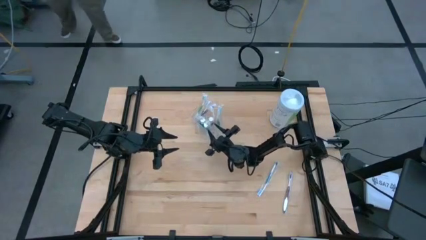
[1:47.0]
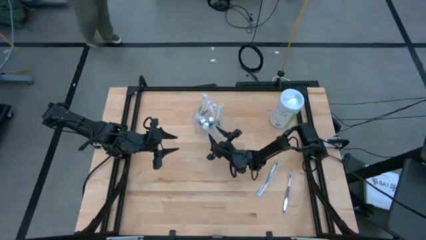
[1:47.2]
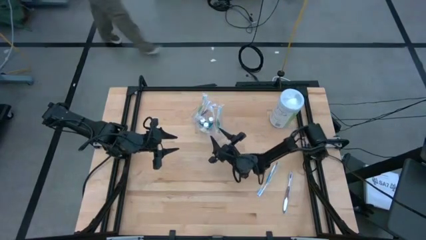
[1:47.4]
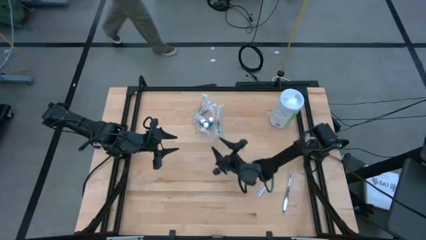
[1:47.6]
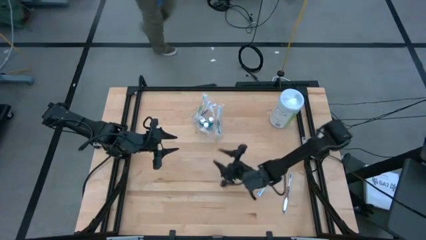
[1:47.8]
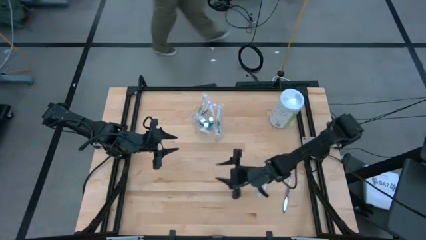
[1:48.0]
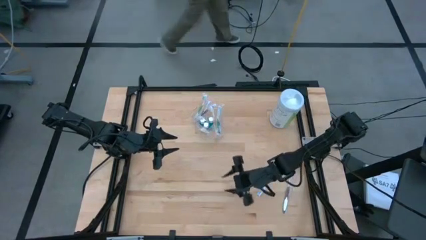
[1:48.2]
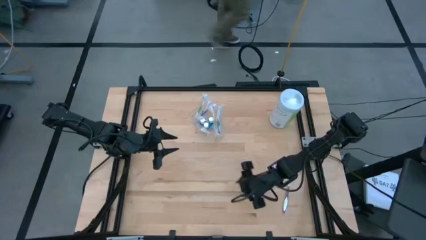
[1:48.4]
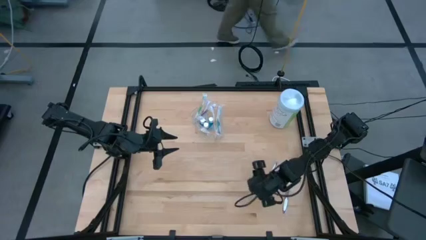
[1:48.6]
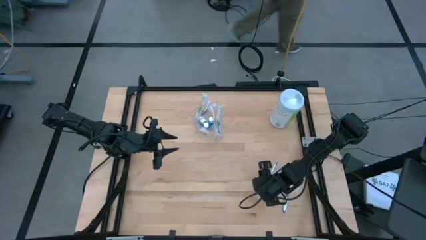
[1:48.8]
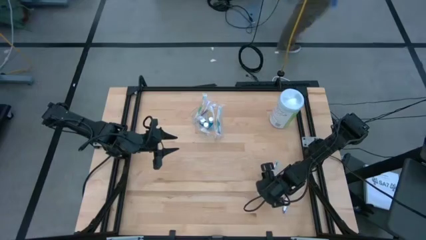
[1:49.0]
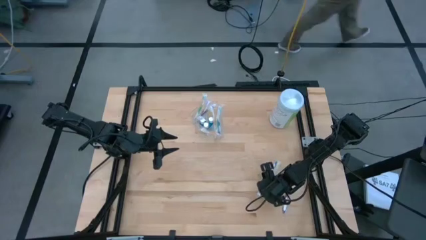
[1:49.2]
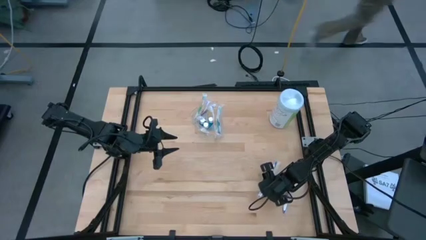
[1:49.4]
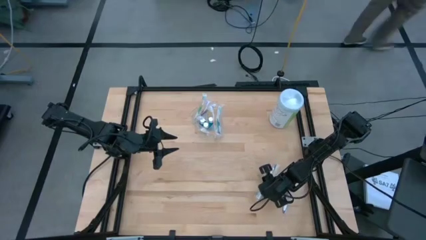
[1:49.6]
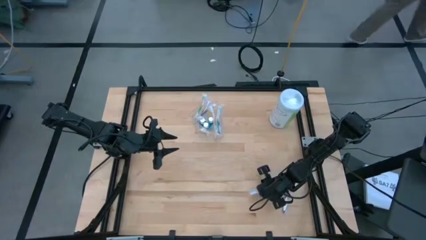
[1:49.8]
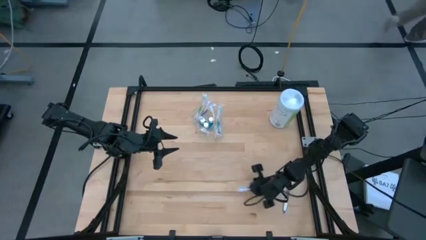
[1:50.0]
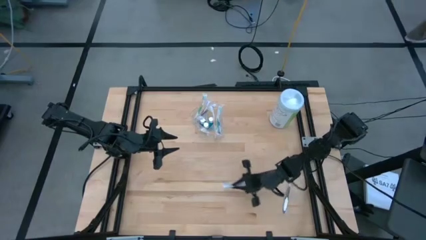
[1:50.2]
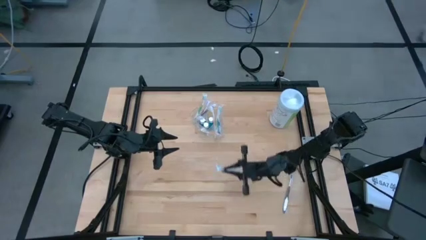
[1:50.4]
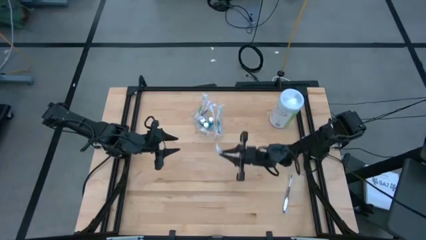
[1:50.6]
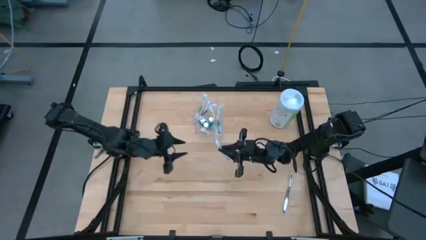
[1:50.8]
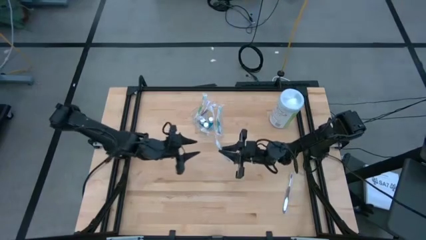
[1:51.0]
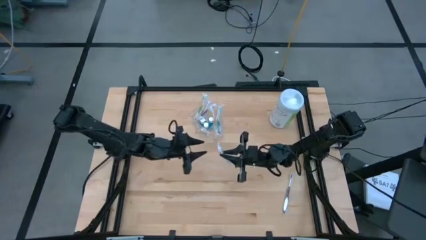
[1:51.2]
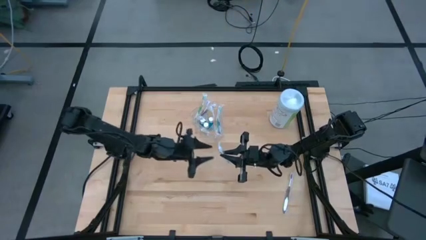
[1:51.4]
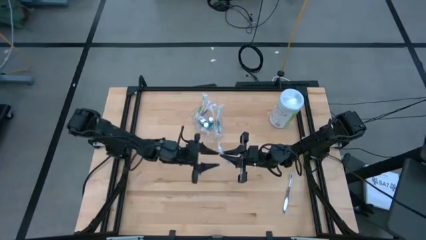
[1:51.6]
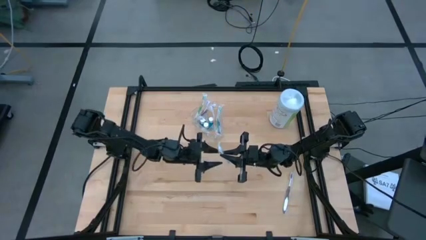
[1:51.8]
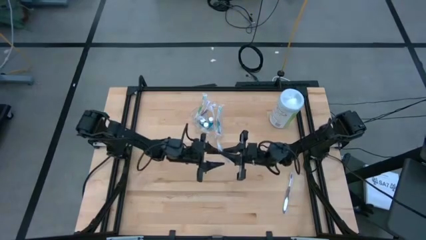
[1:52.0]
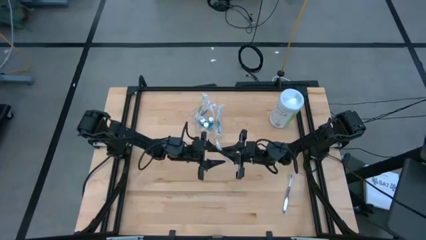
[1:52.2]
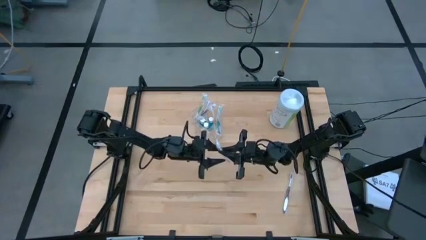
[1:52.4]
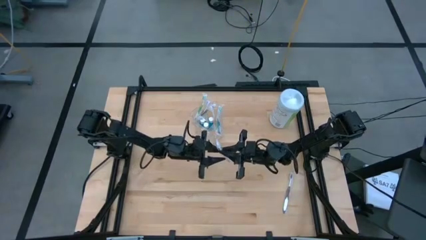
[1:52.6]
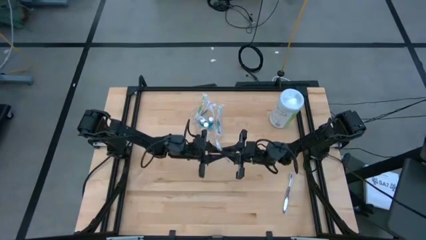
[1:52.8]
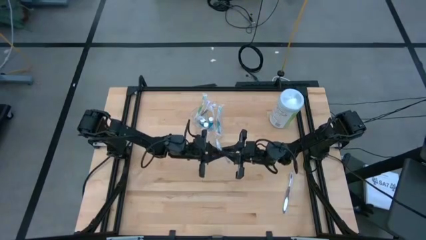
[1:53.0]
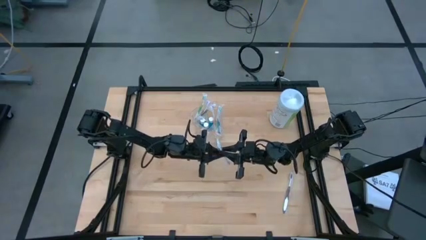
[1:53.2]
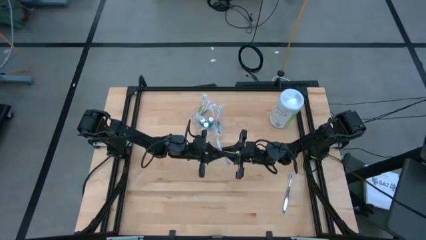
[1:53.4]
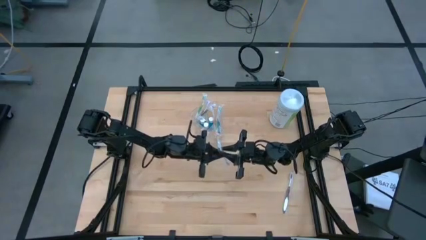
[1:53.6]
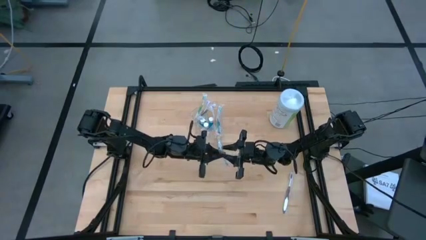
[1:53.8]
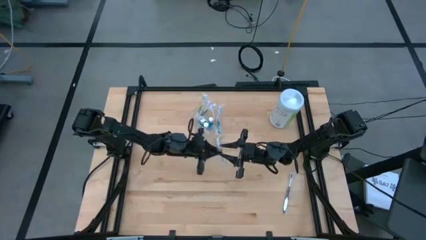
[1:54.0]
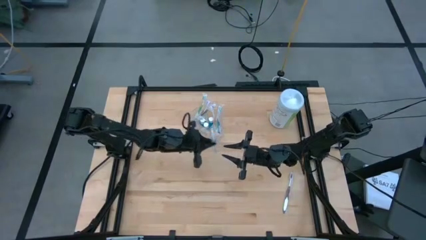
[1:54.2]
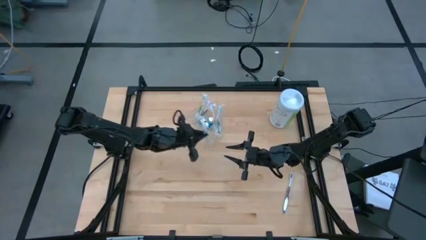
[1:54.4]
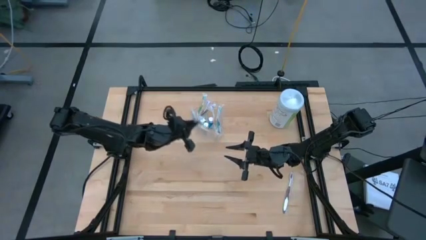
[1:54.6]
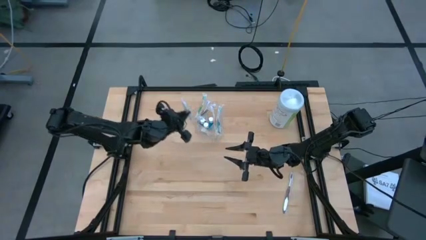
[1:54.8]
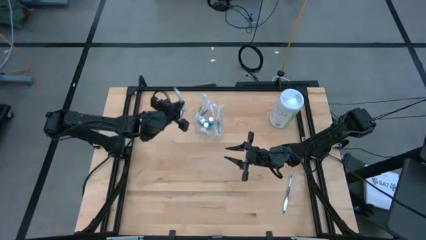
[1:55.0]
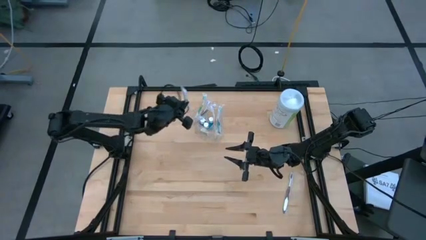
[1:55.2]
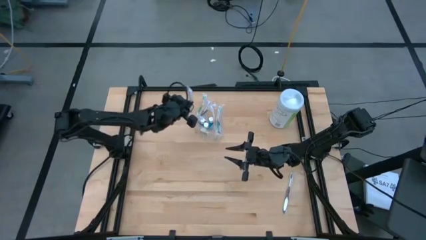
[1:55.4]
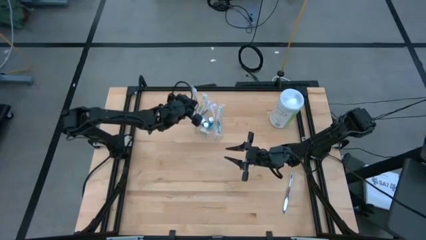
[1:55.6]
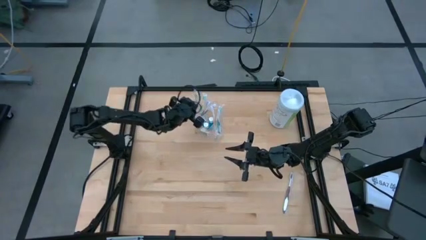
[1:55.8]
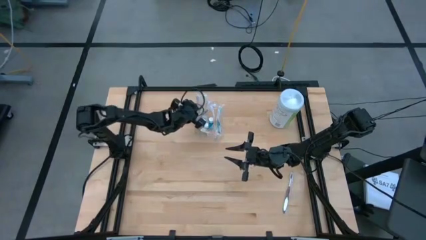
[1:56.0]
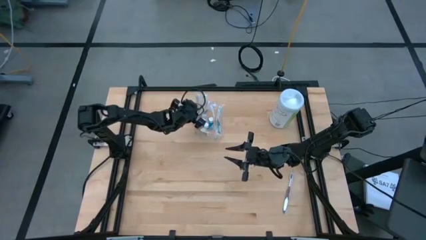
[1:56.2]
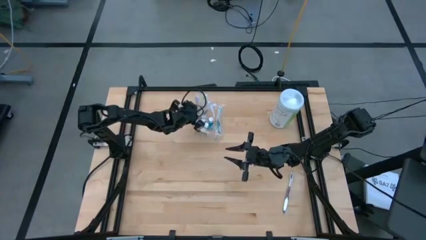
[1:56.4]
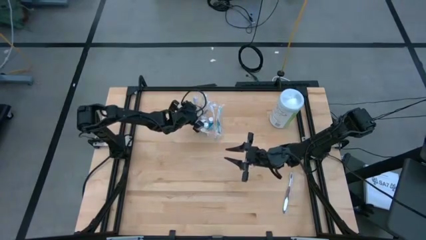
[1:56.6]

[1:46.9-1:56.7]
Task: Pick & Place toothbrushing station
Put the blue toothbrush into the left section of the organizer

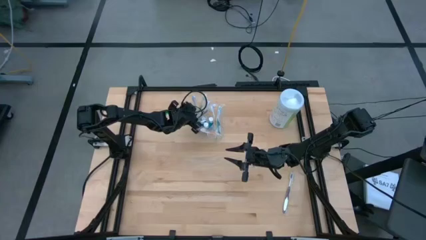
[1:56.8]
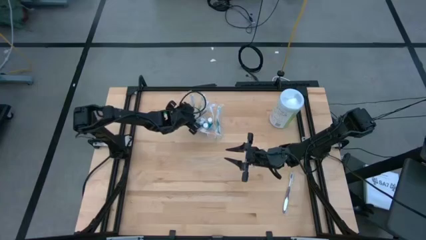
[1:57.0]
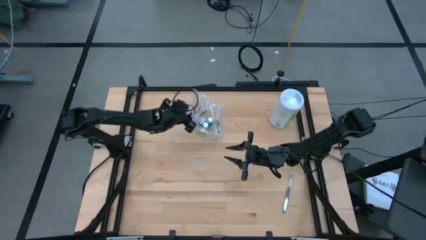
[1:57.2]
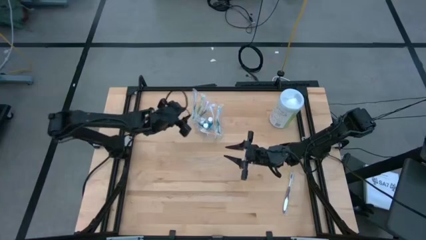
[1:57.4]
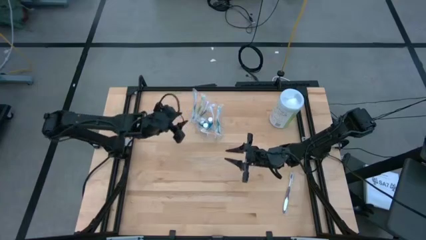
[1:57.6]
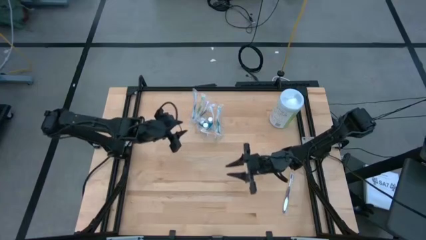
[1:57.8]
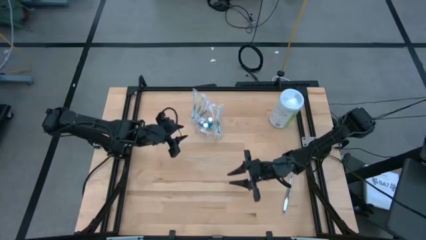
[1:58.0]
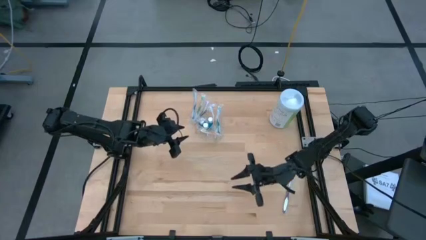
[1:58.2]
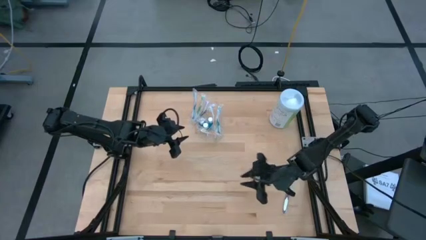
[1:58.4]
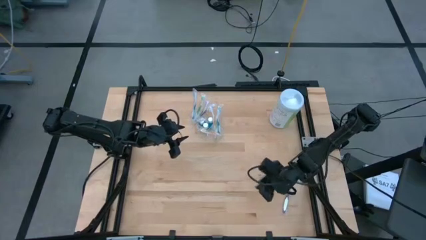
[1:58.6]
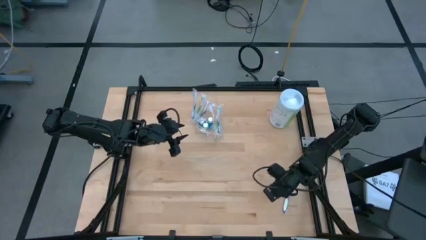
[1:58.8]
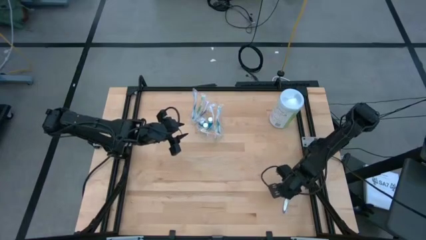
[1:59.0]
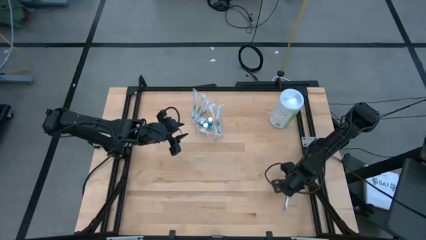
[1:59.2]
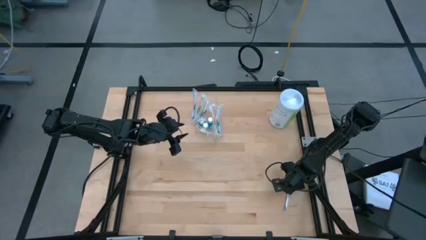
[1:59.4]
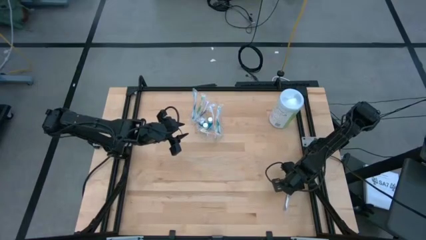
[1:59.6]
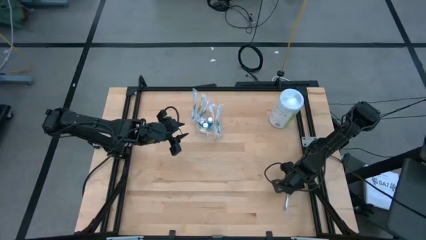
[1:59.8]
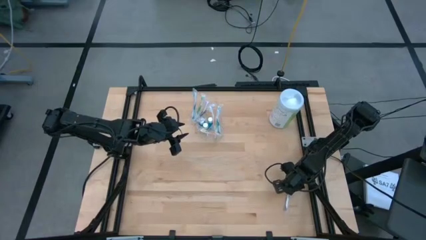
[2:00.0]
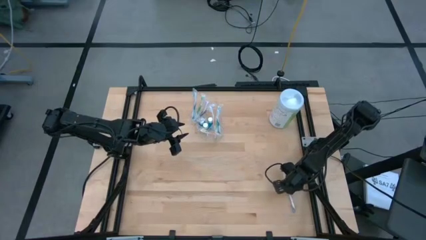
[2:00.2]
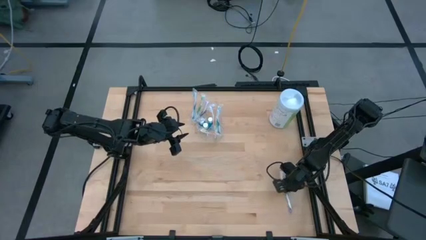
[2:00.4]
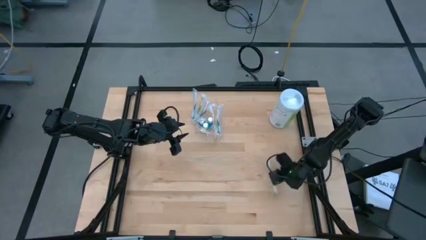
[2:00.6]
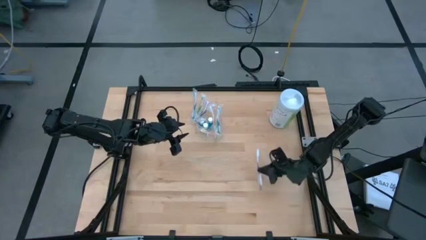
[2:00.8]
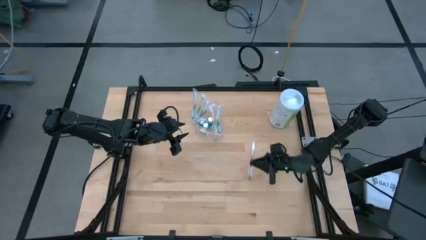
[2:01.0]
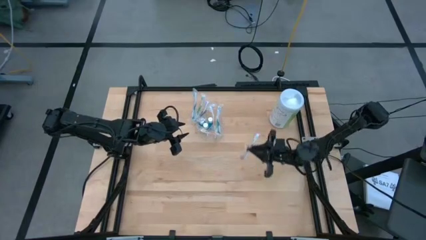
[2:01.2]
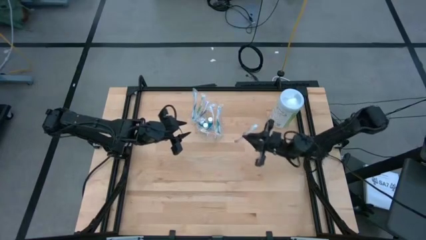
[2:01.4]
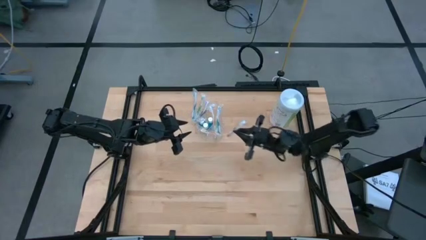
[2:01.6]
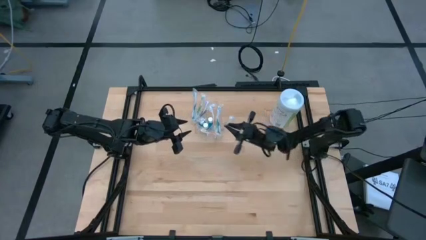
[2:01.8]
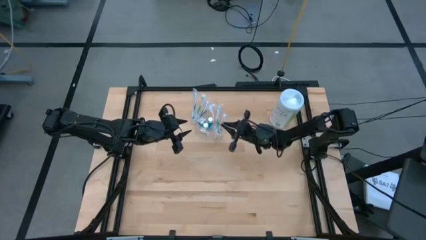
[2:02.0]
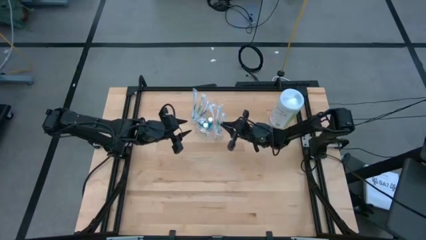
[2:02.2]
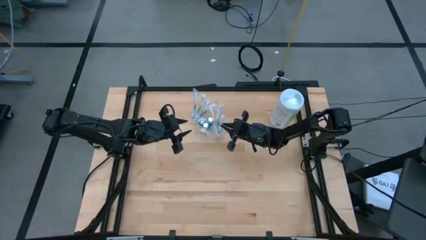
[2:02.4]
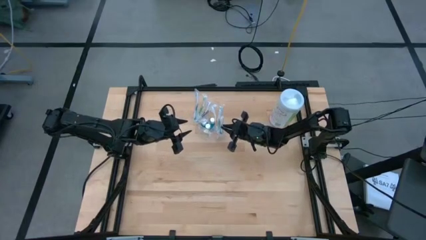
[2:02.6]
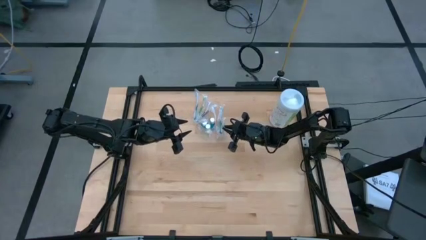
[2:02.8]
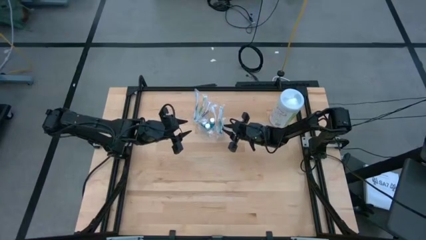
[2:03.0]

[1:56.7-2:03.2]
Put the purple toothbrush into the right section of the organizer

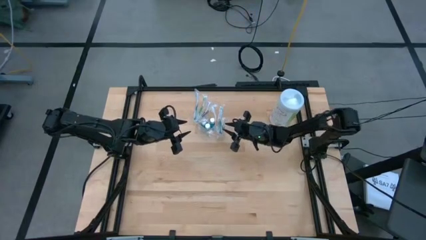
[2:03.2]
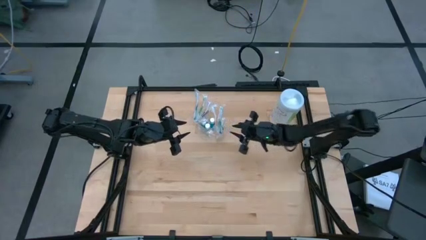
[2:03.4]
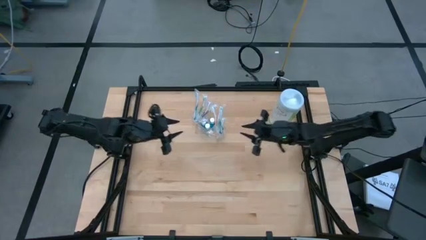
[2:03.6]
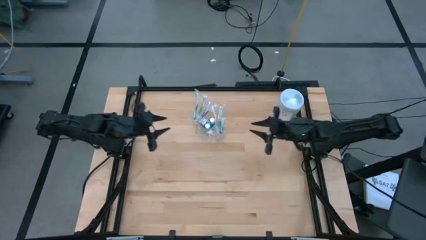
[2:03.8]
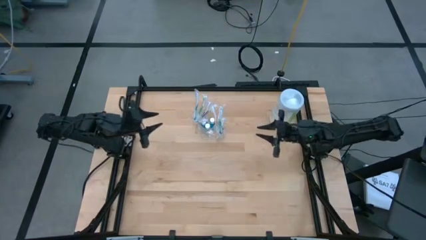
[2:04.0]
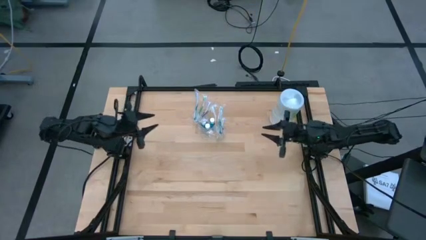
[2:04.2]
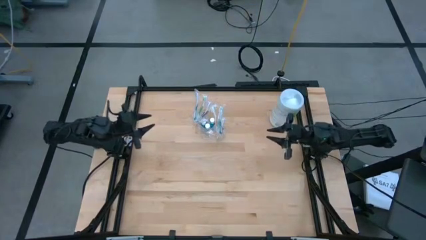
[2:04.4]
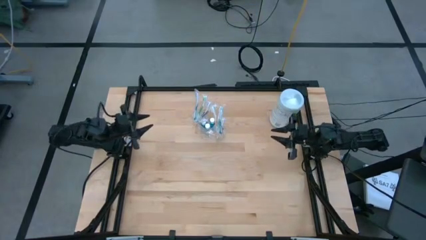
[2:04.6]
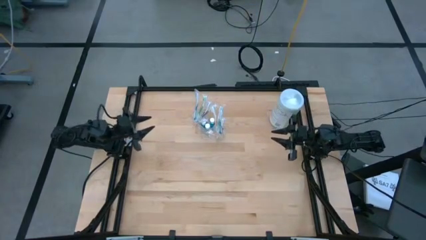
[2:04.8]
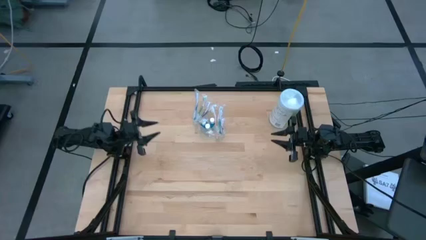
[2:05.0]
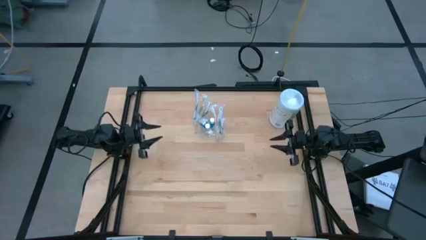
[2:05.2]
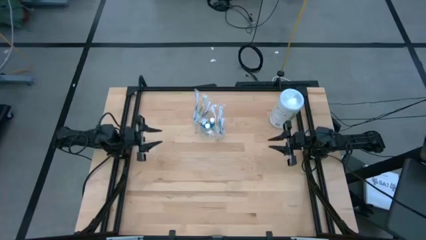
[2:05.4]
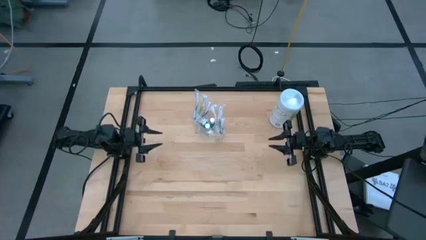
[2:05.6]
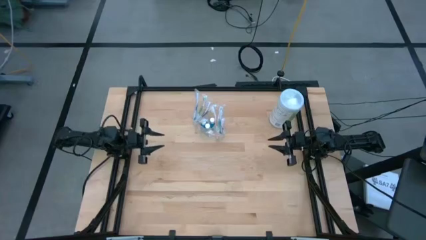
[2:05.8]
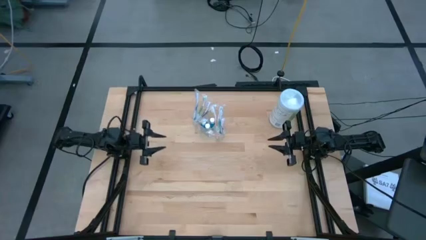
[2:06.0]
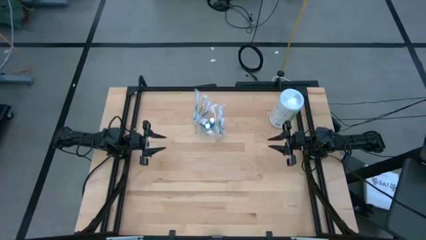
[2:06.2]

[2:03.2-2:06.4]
Return to Home Position
